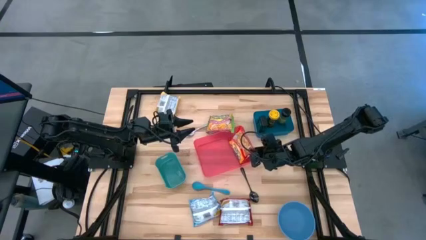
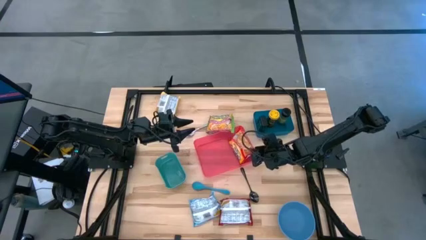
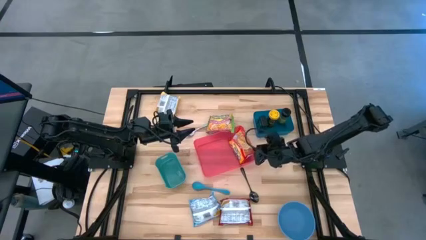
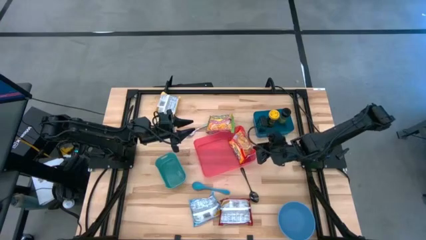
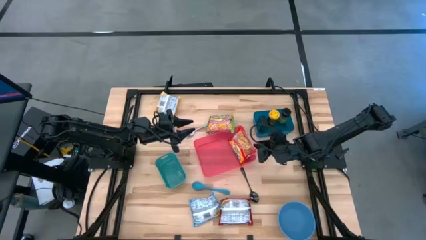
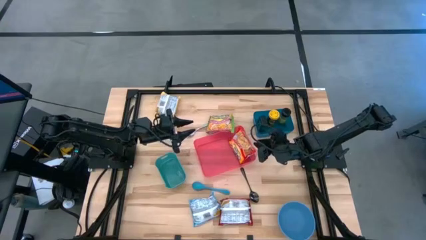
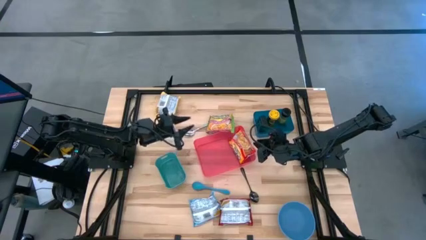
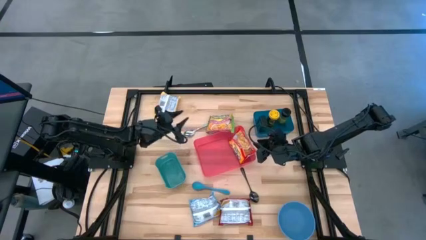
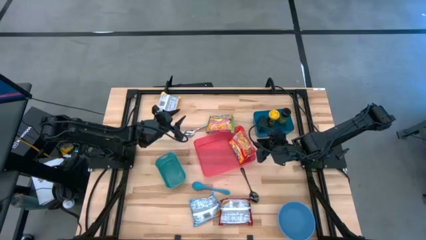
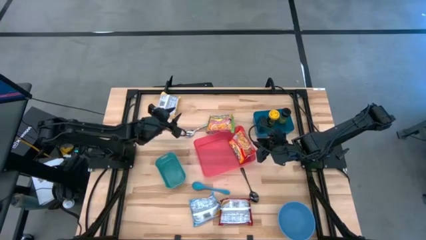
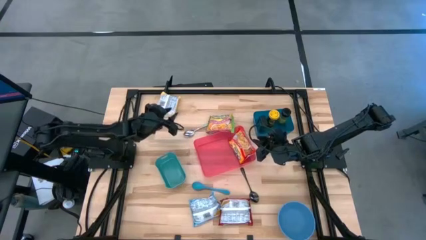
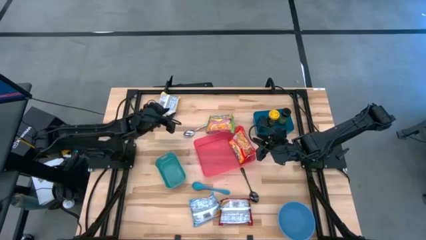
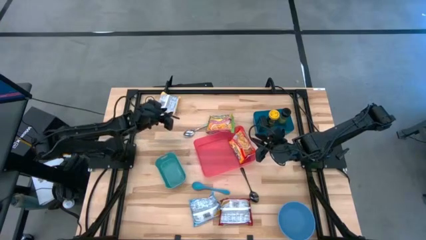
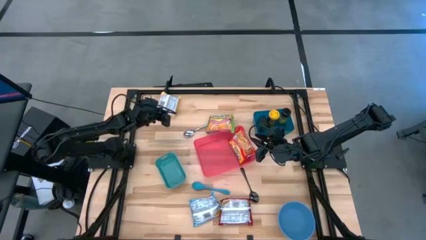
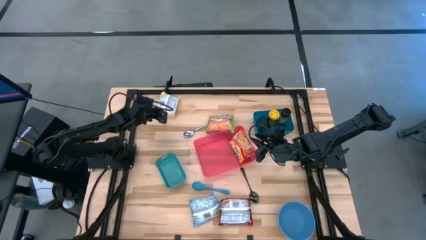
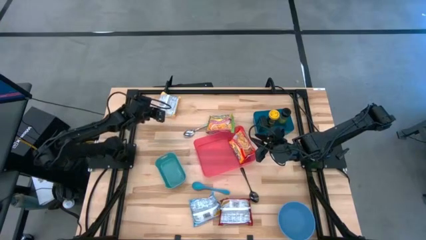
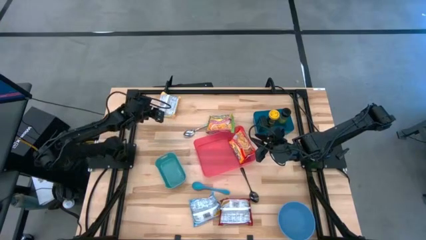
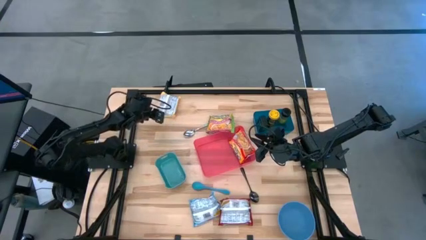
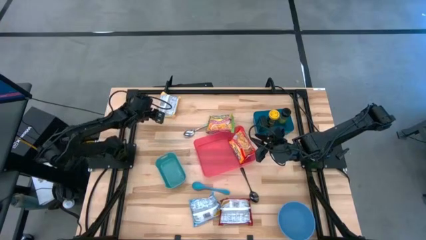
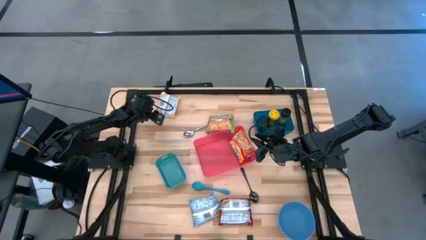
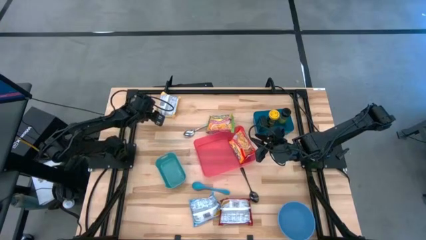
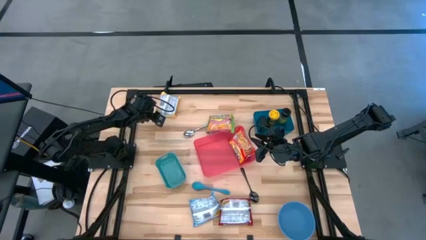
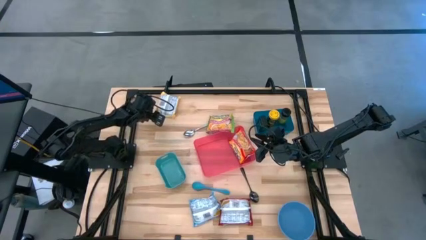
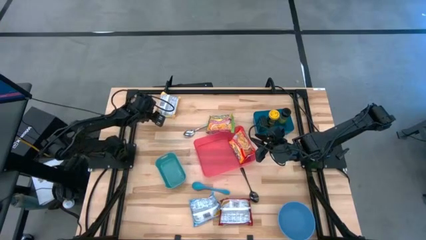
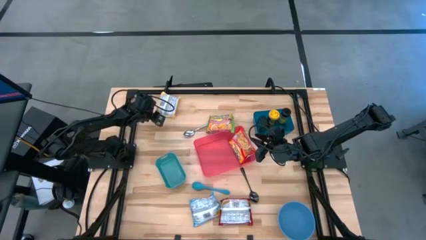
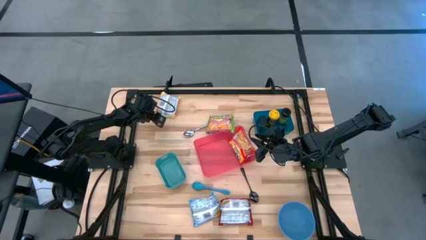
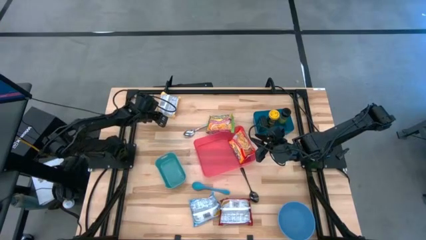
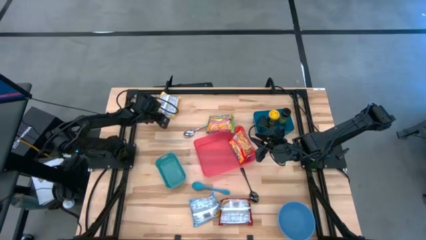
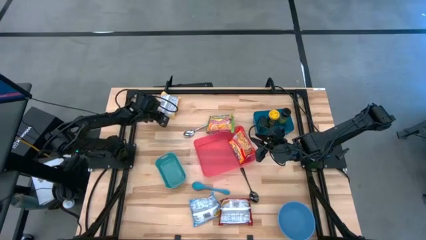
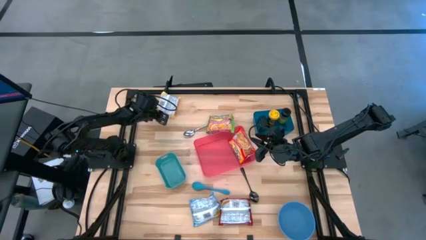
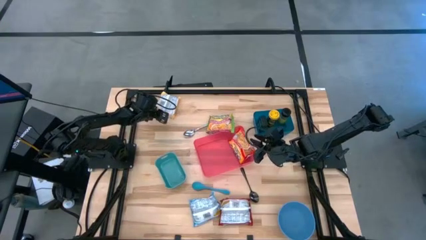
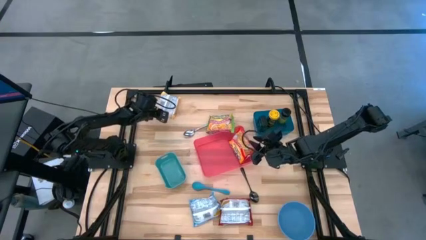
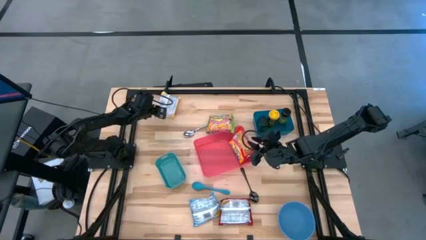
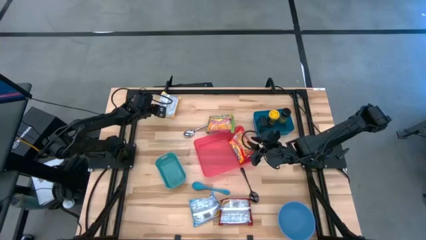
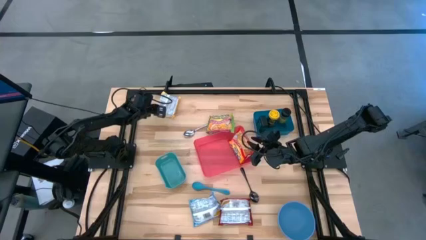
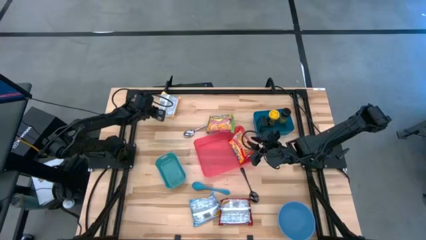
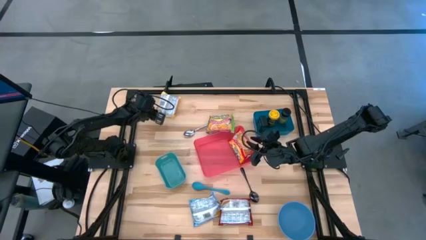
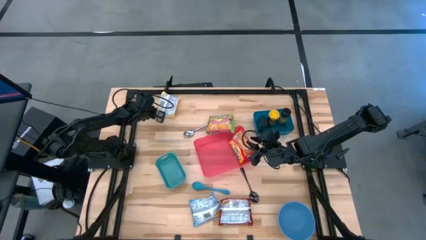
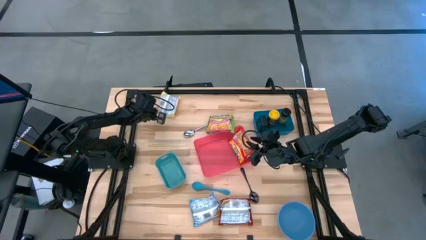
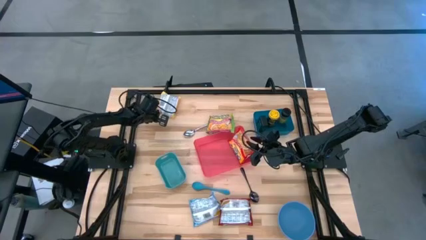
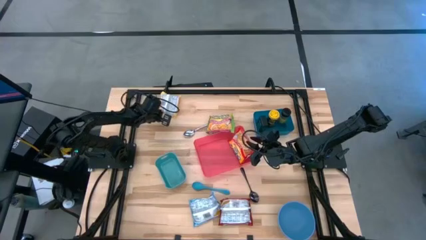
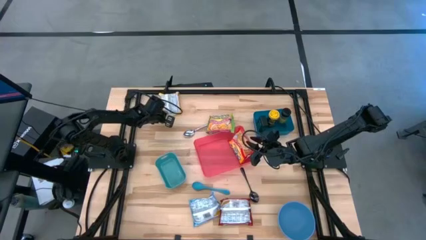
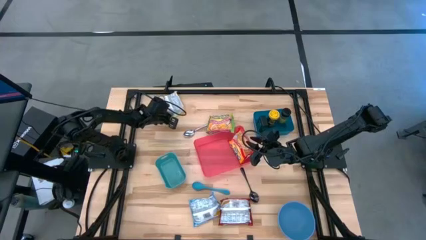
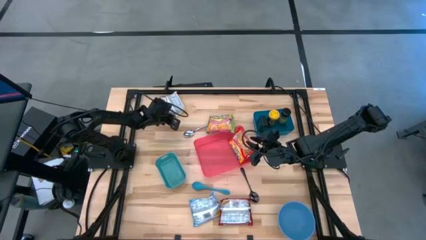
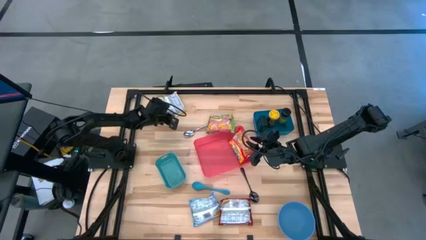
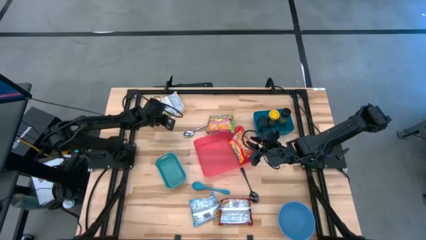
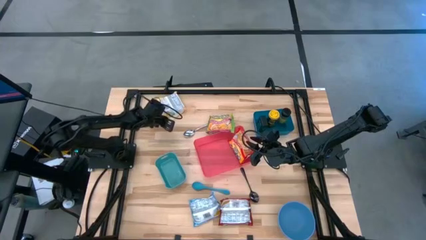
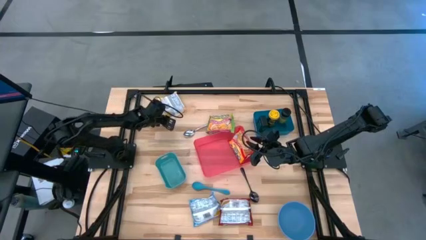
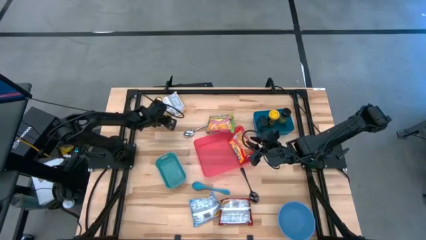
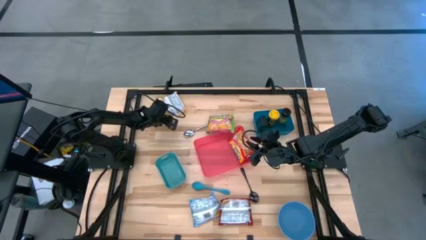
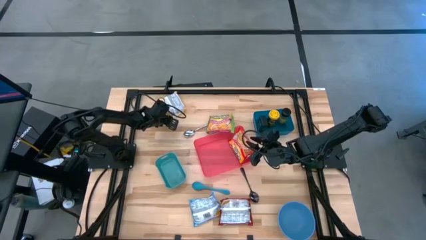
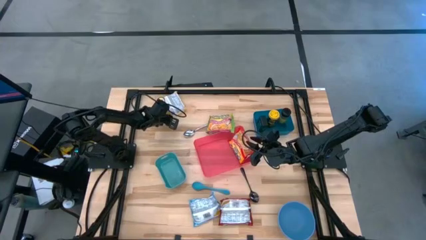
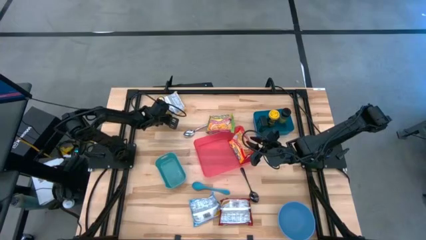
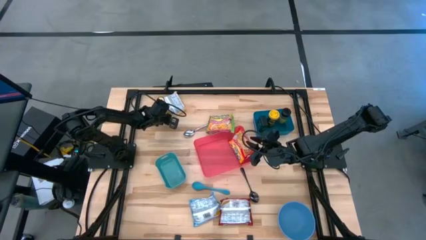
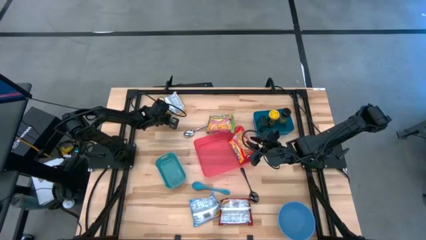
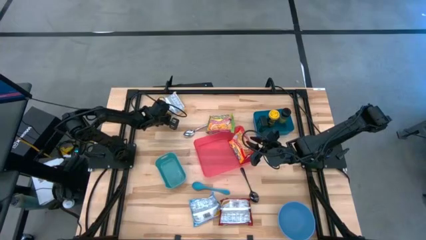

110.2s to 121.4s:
Task: Pick & Place Food Item
Put the yellow noodle pack into the red bin
